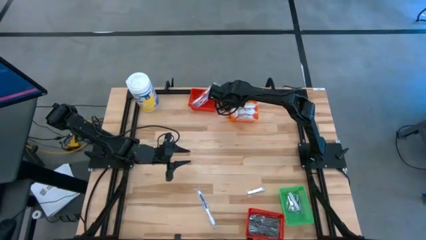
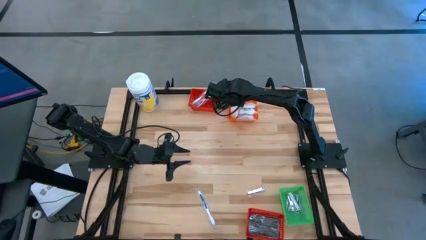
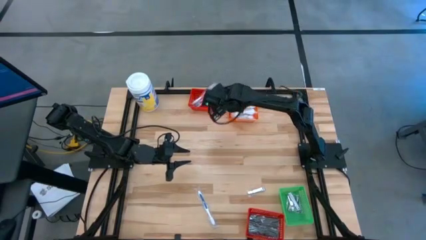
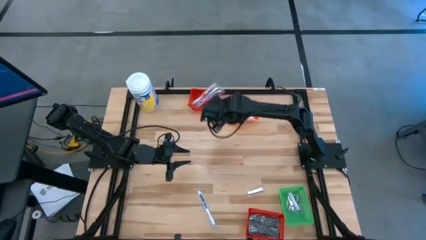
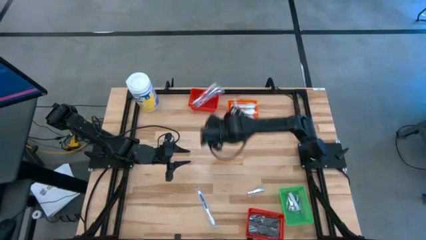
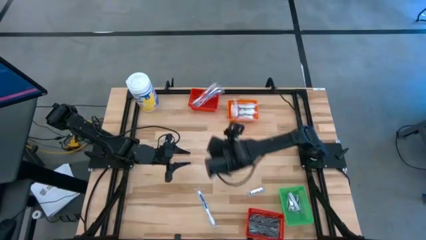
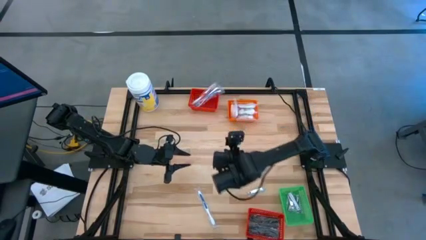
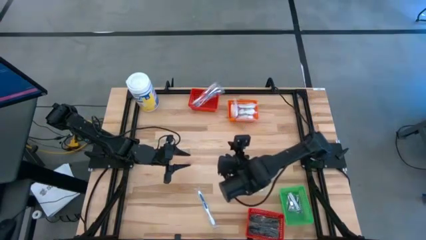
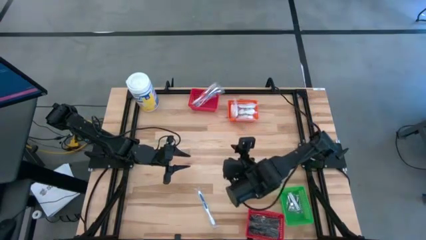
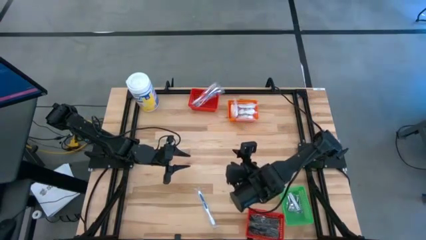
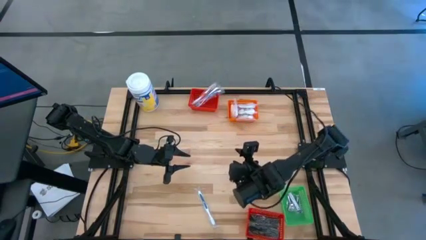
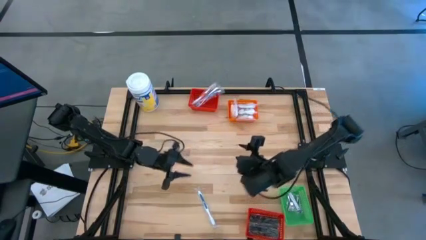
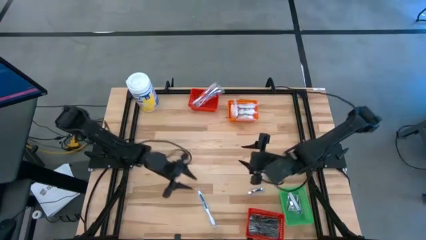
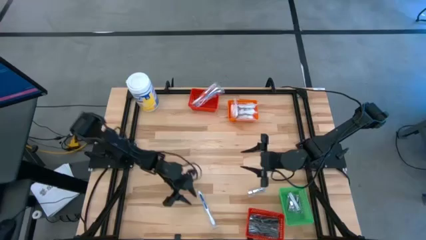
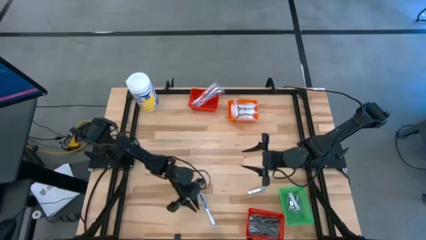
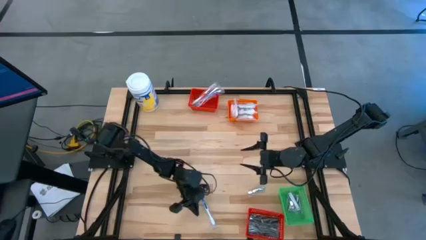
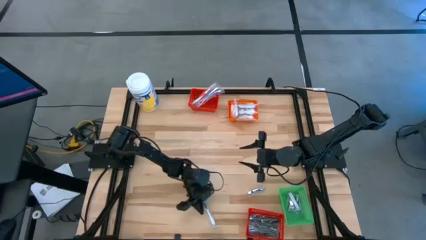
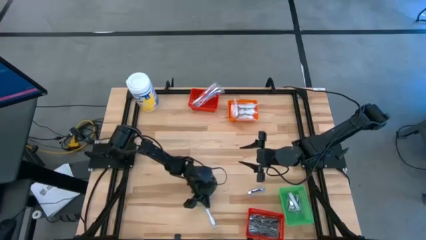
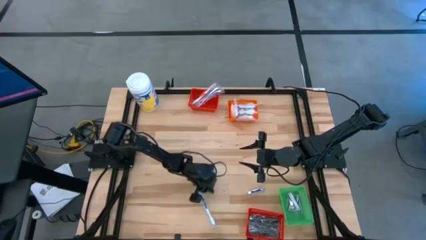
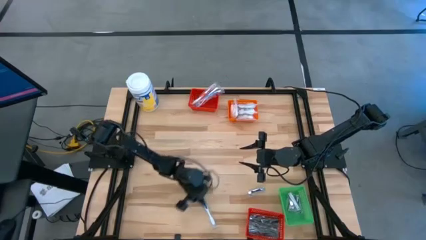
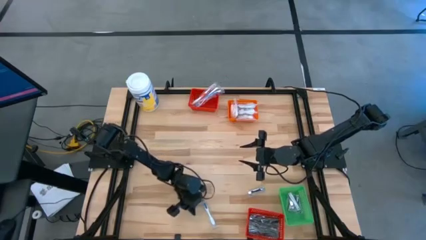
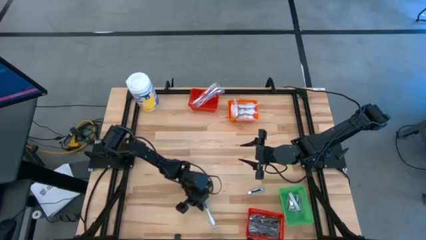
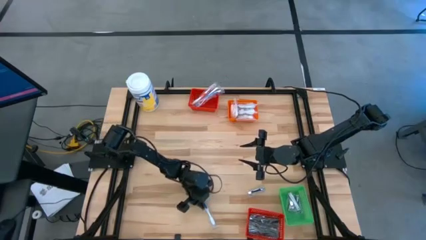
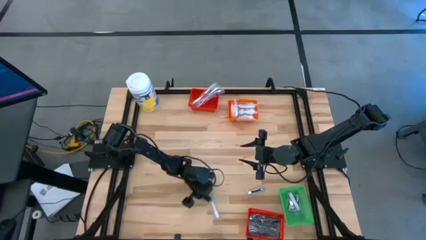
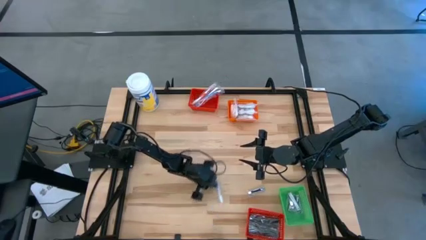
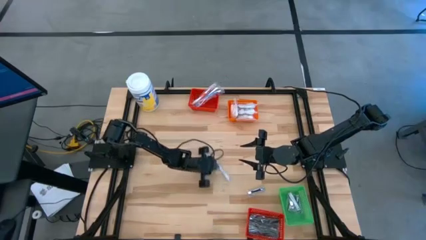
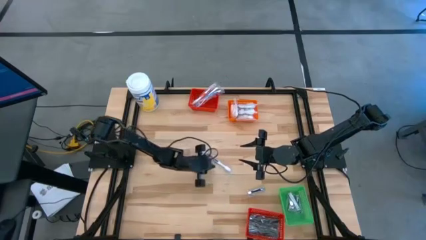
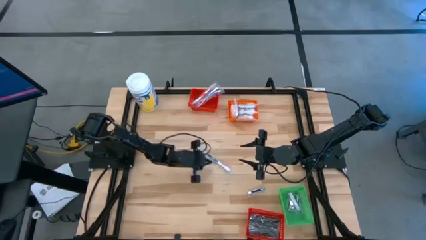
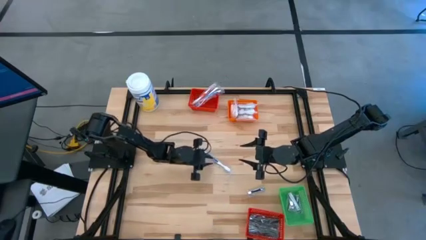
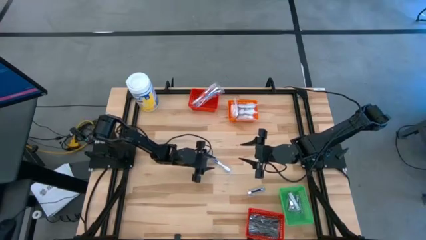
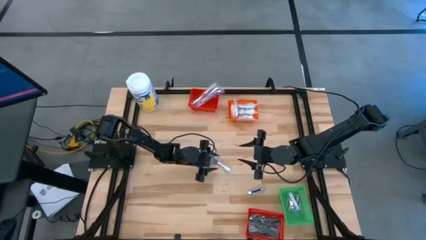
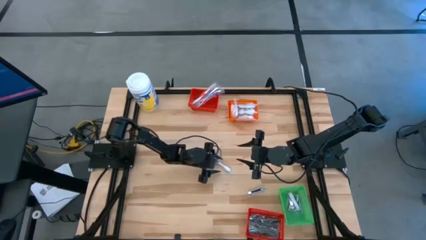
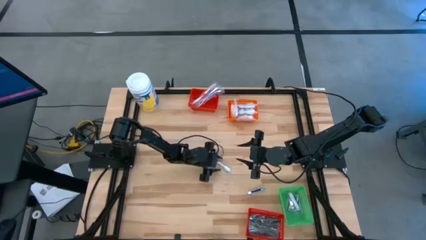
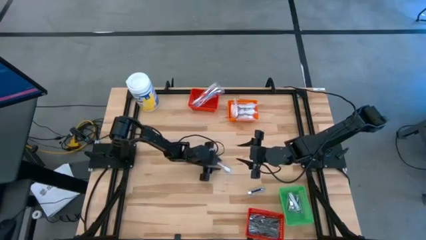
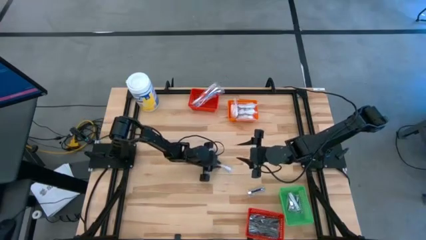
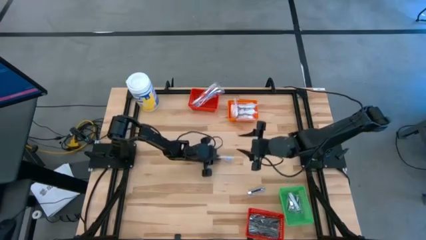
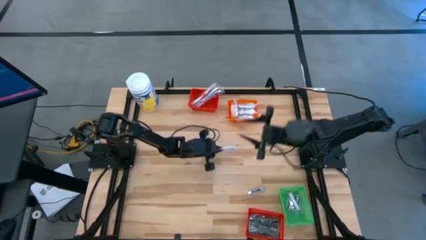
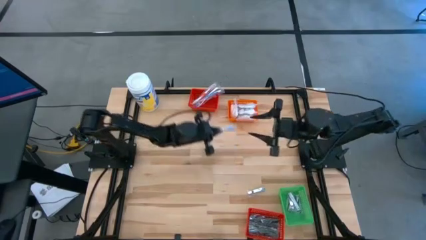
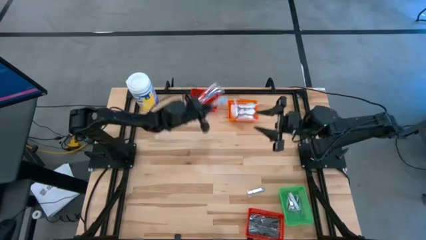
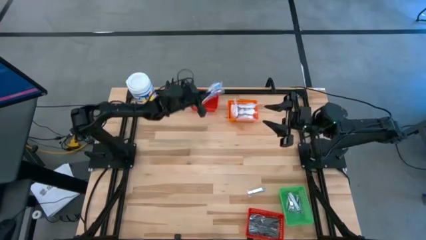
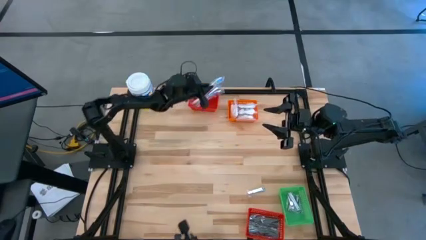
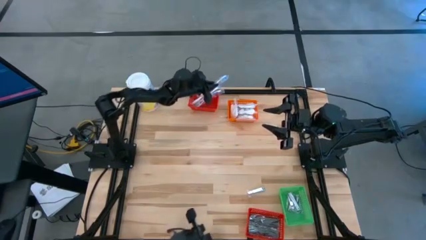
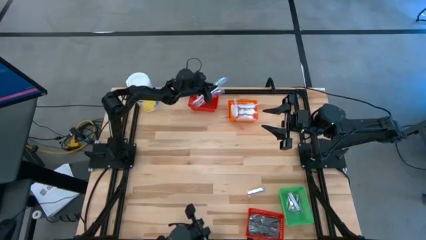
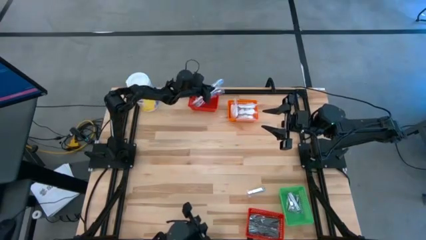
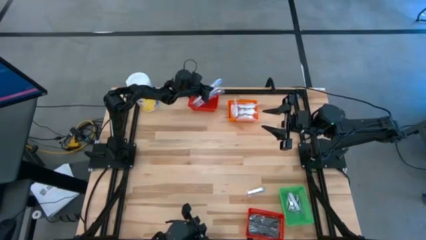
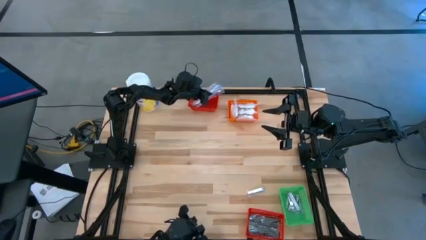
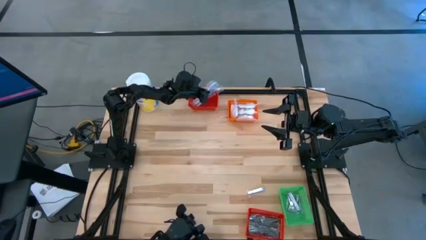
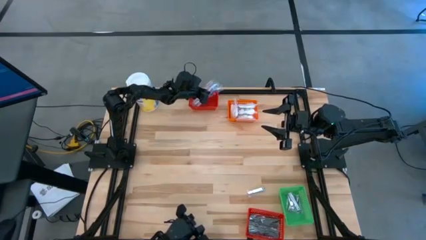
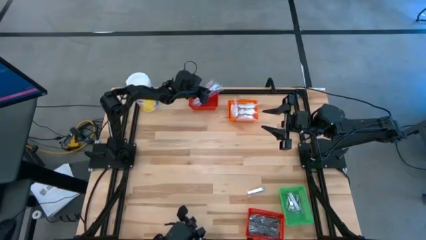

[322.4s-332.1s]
Task: Pick & Place Travel size toiletries
Put the blue toothbrush into the top red bin

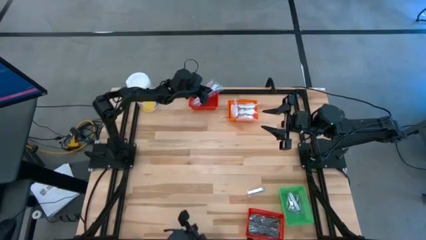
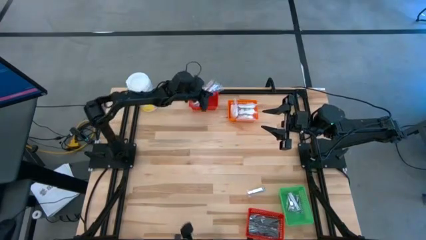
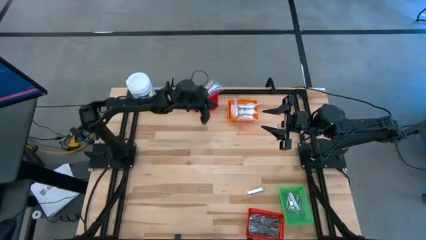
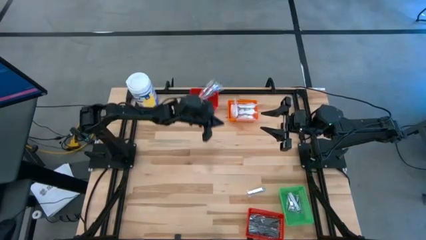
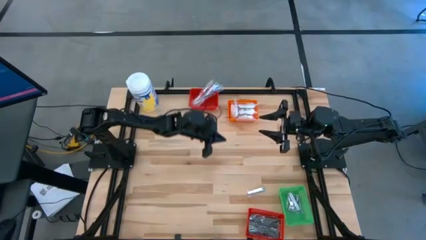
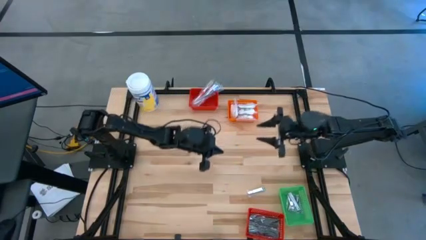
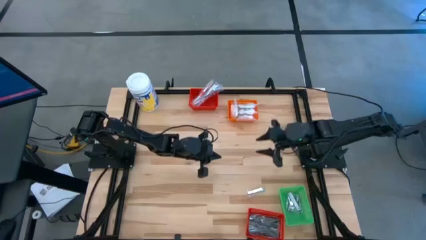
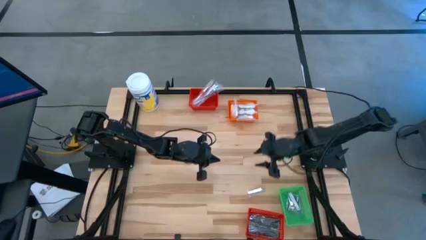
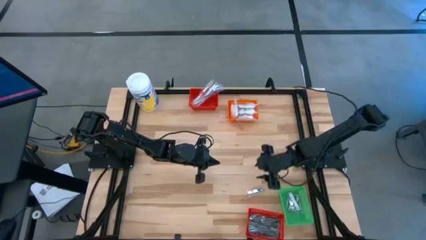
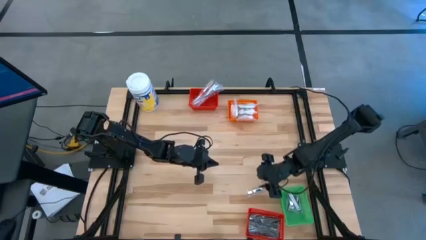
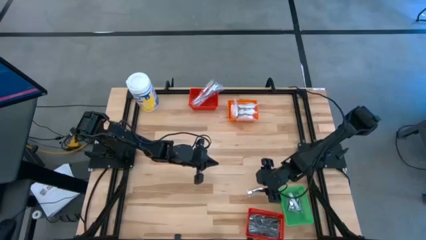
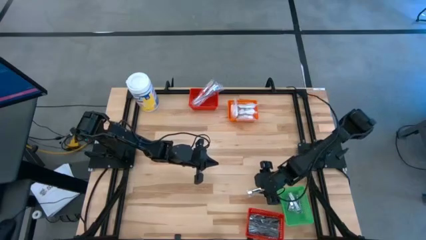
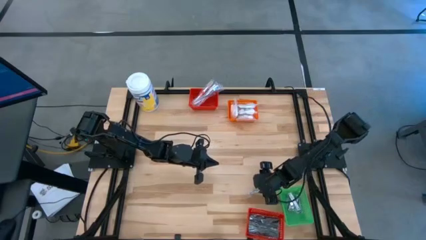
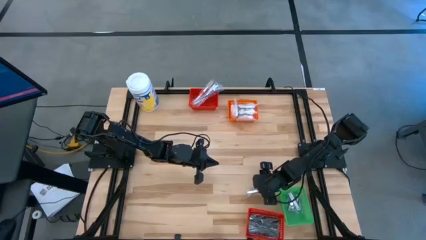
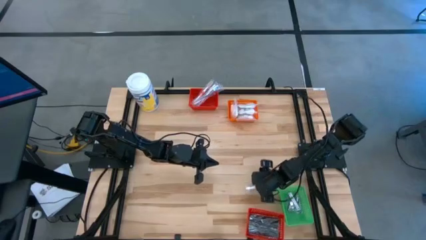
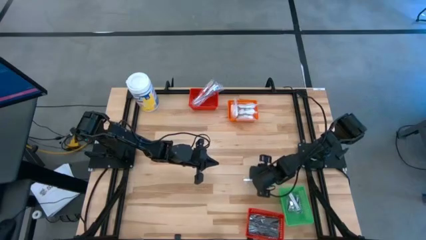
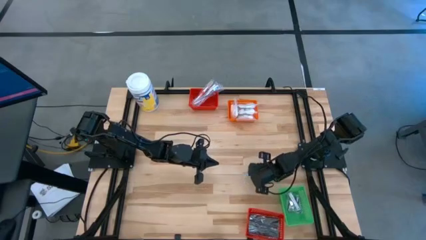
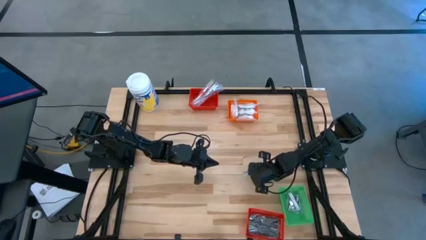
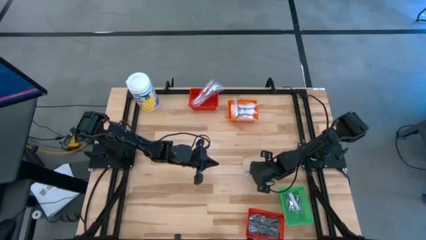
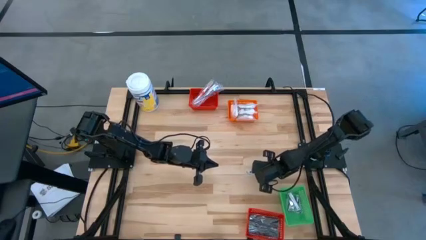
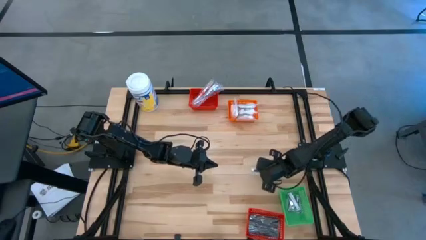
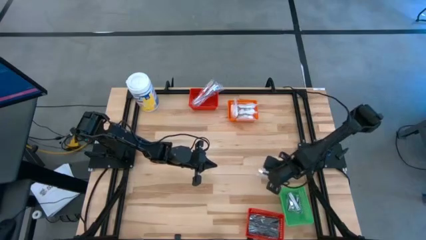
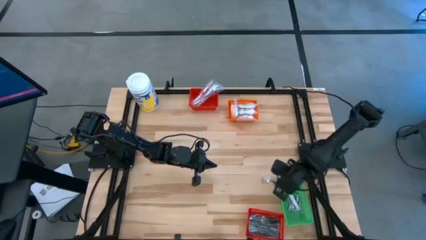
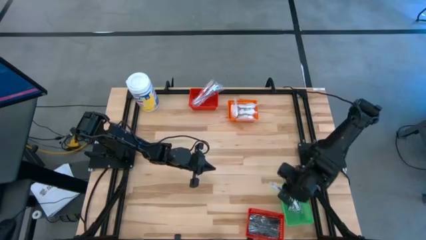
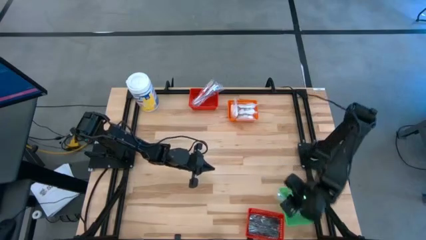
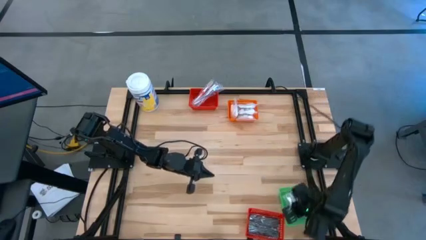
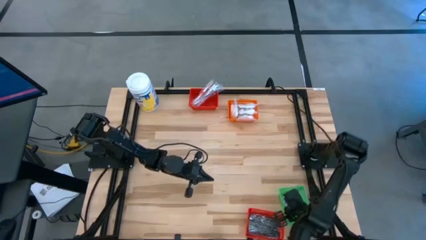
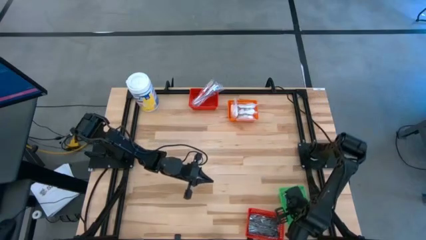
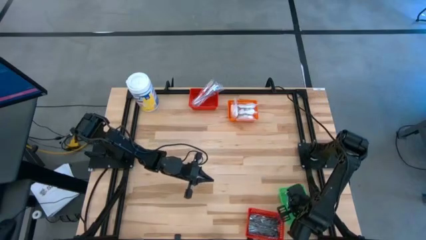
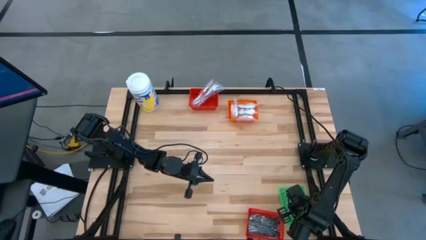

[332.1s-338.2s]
Put the silver nail cutter into the green bin

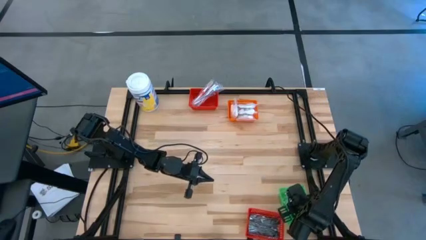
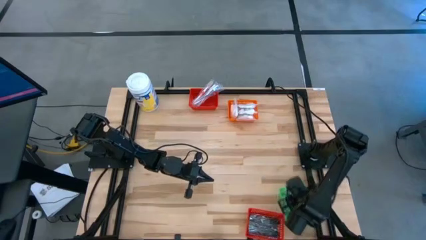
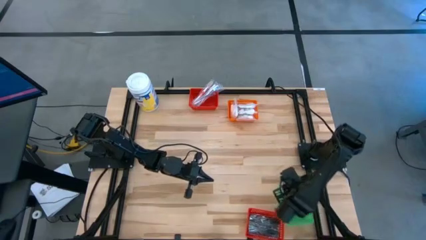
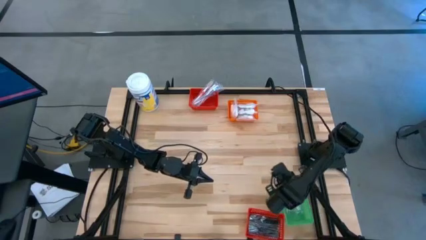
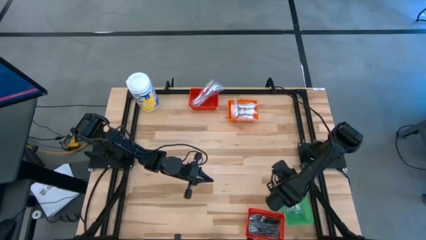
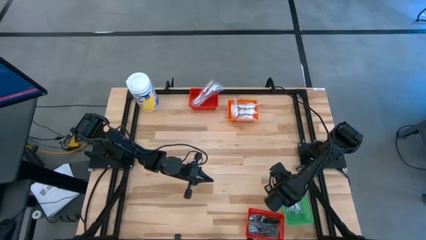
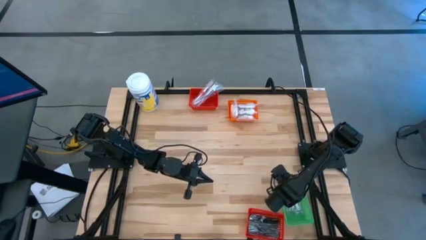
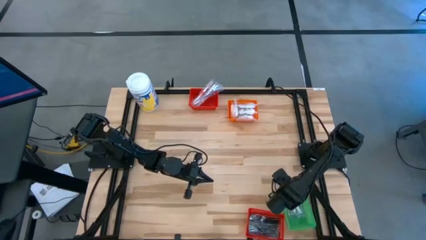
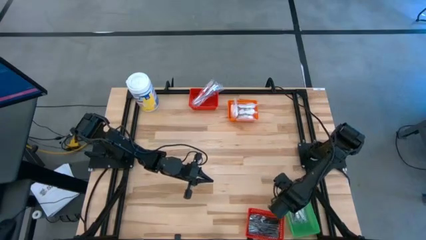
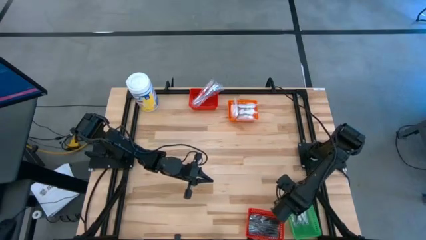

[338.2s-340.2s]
Adjust the green bin
